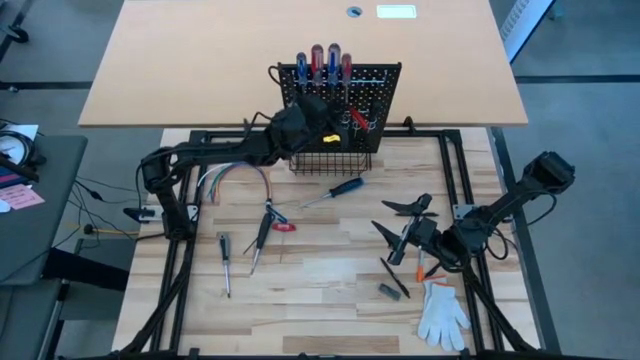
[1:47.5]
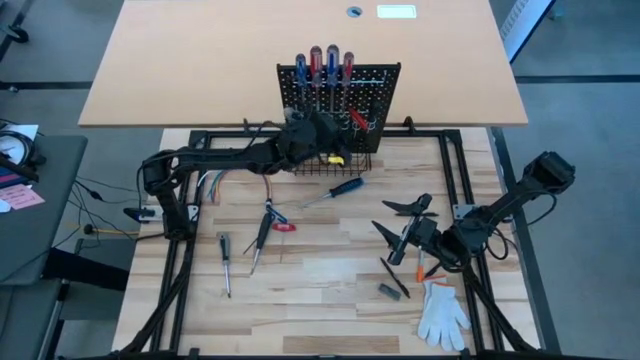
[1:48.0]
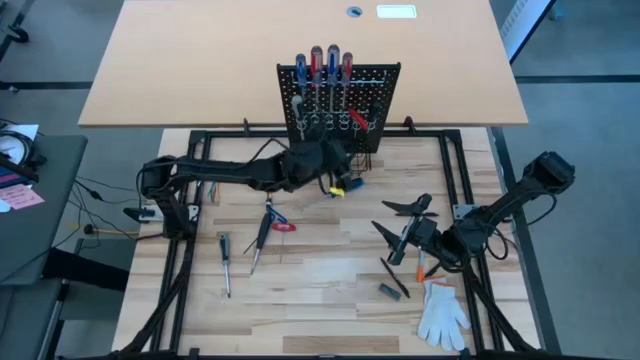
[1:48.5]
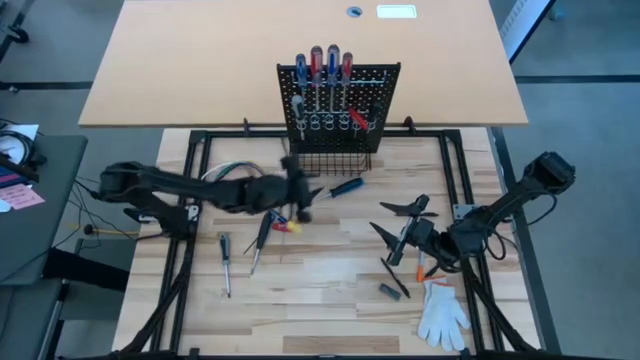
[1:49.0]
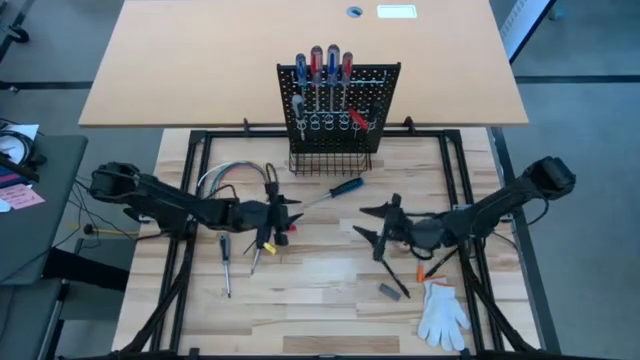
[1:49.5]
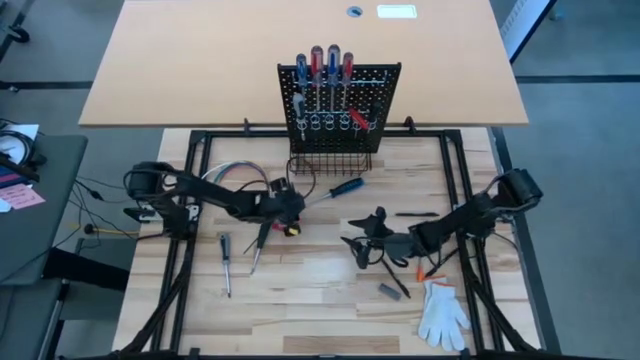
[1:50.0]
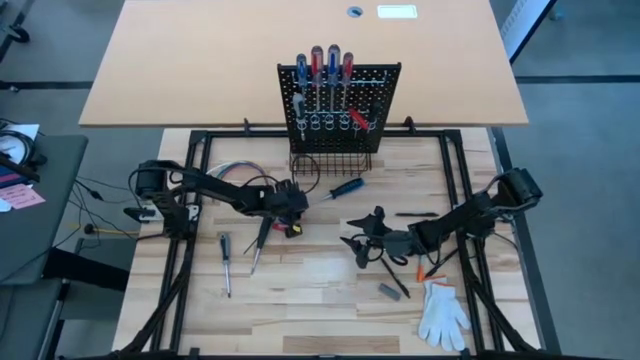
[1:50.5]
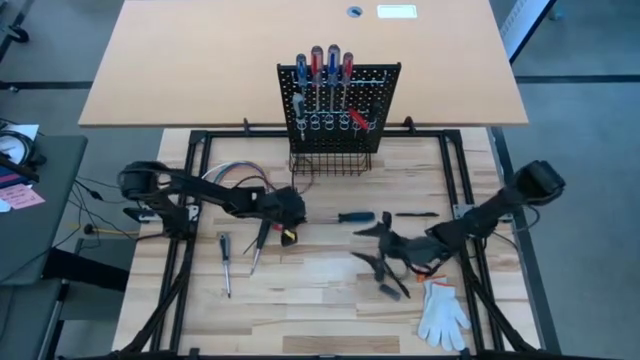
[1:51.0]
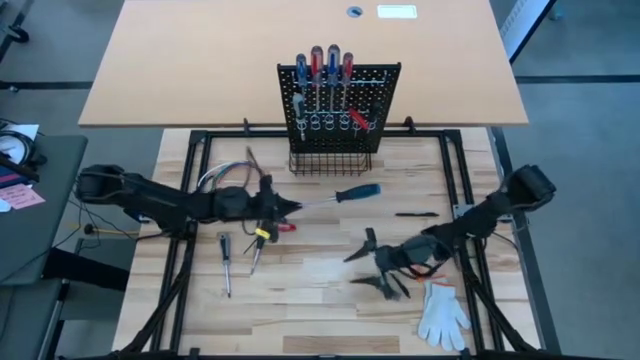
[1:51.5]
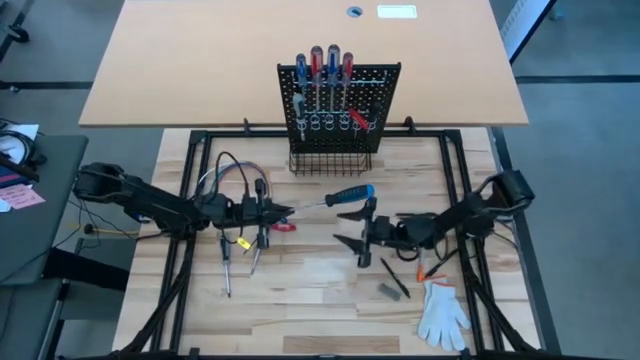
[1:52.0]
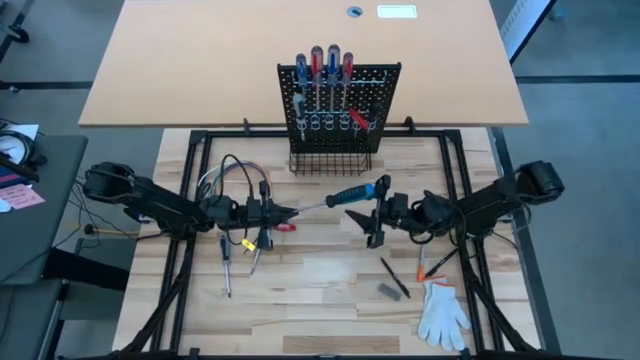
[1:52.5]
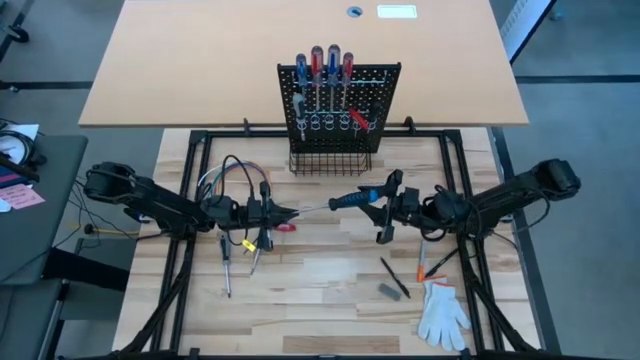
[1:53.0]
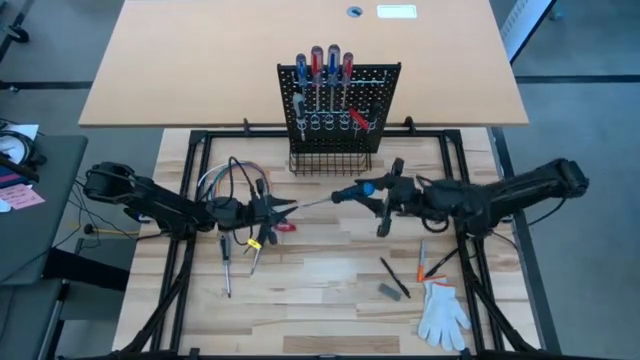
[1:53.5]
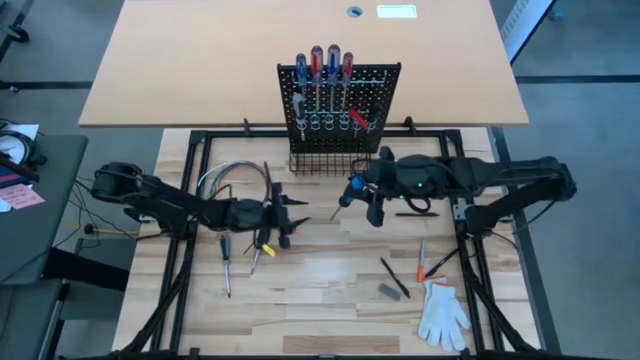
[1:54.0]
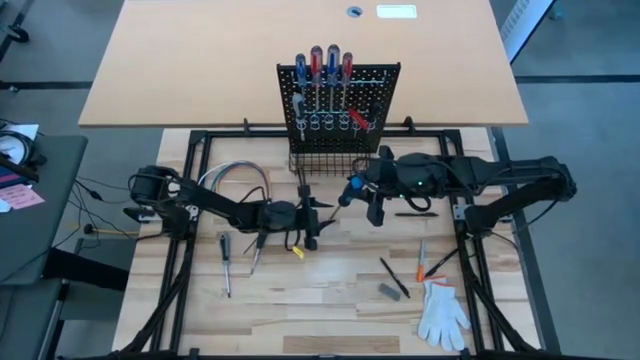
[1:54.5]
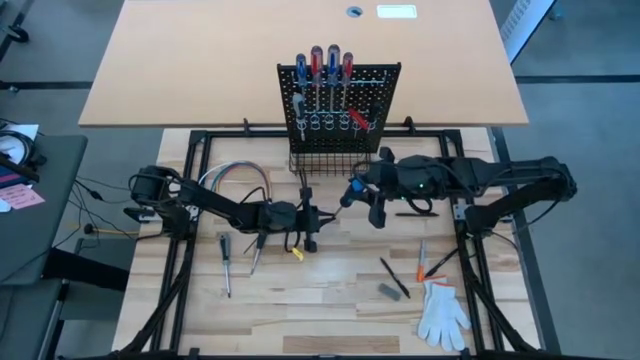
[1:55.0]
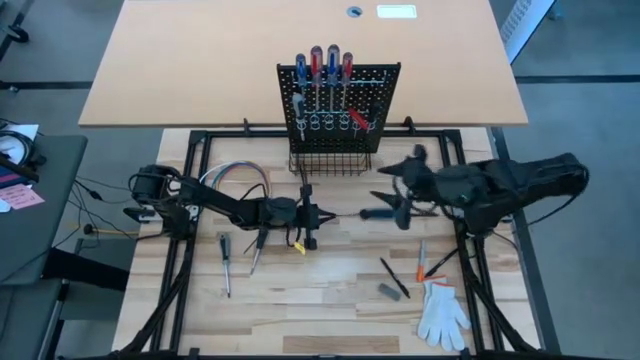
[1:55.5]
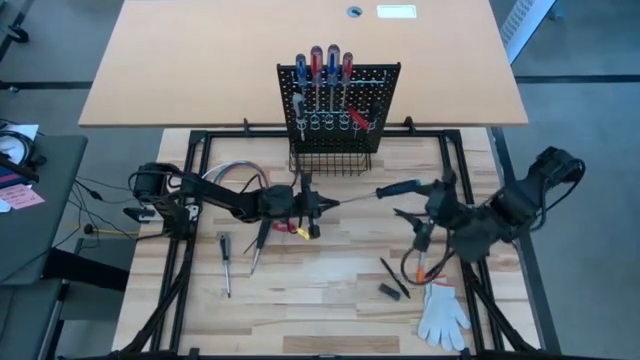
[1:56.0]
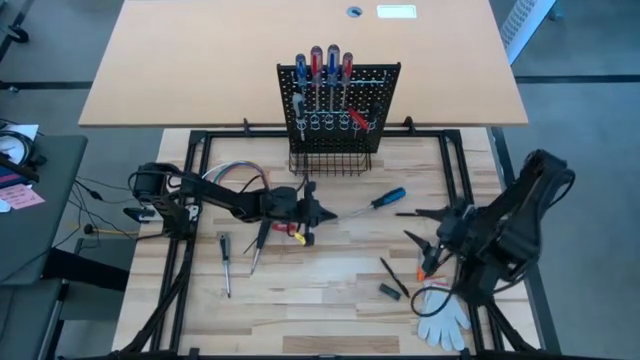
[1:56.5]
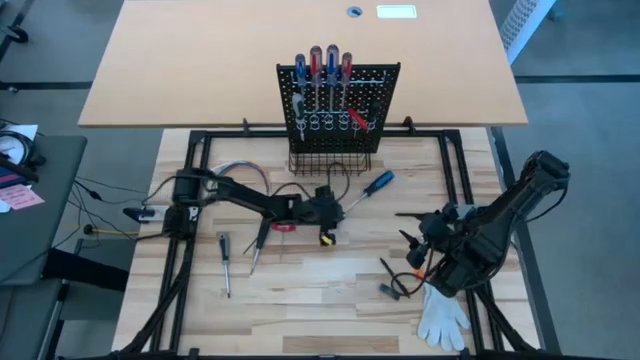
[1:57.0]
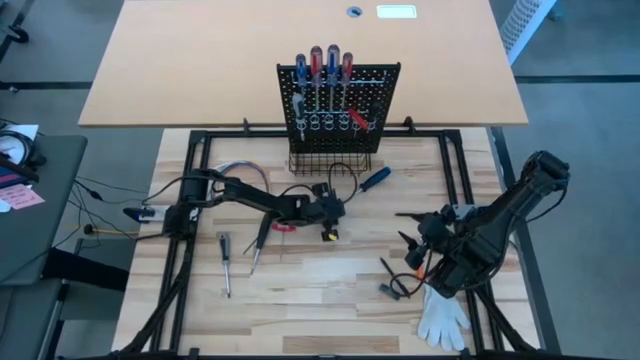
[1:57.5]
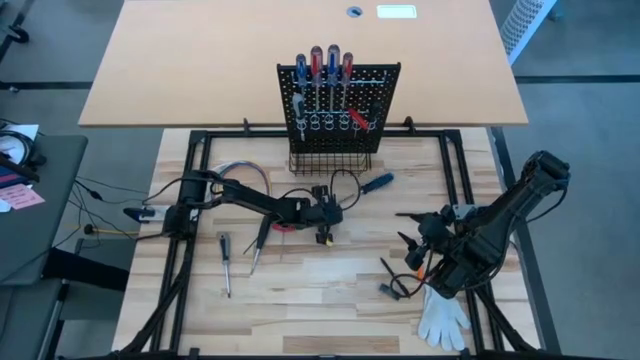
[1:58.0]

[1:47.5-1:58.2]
Task: Hang tools onto peg board
Hang the black and blue screwdriver on the black peg board

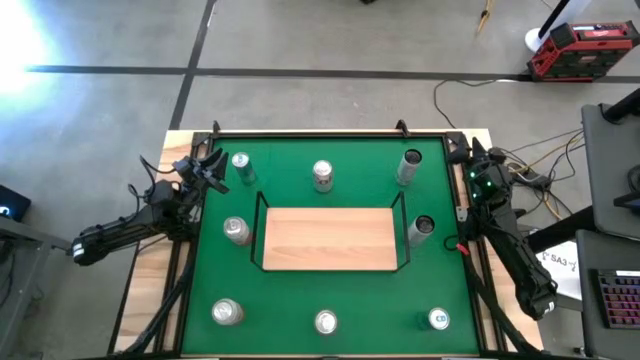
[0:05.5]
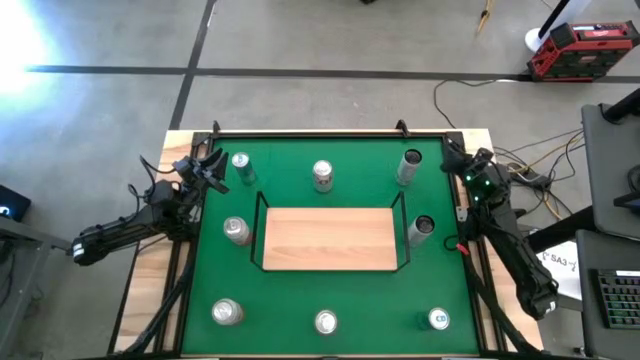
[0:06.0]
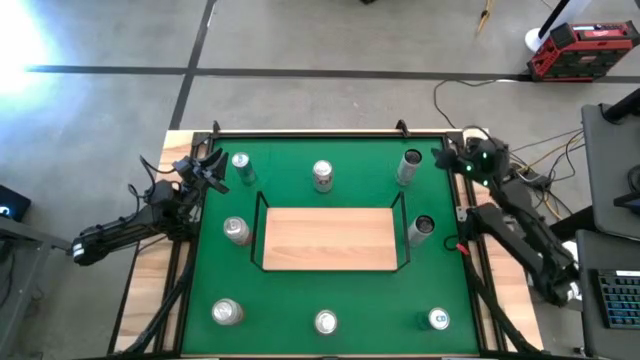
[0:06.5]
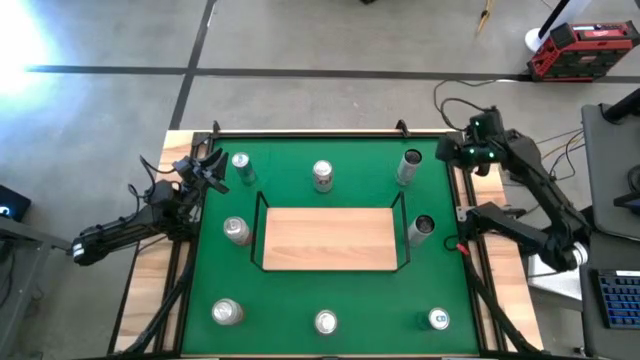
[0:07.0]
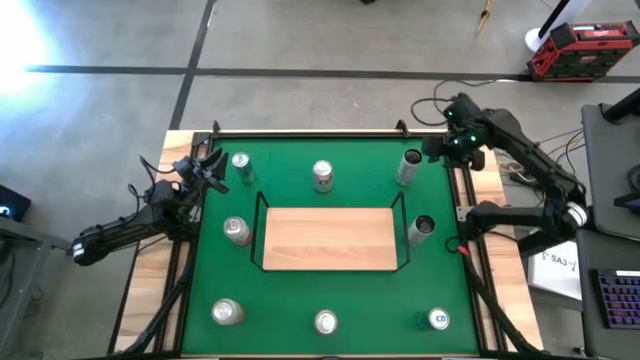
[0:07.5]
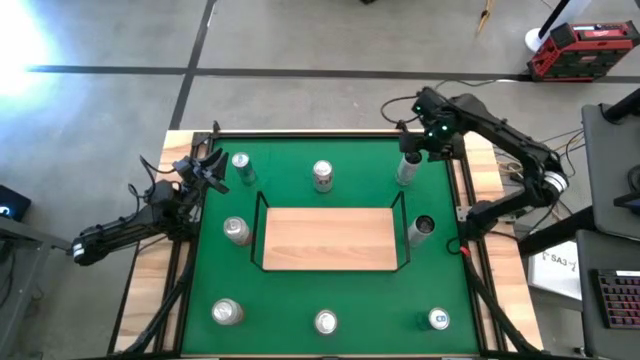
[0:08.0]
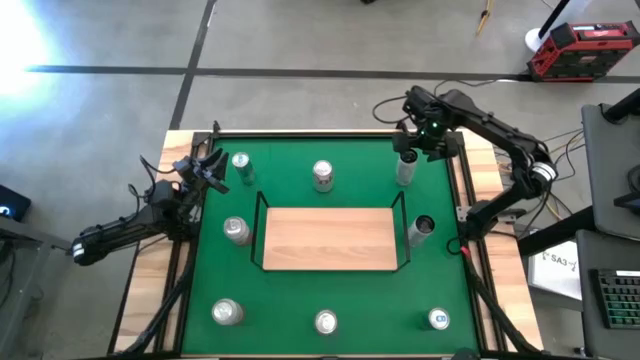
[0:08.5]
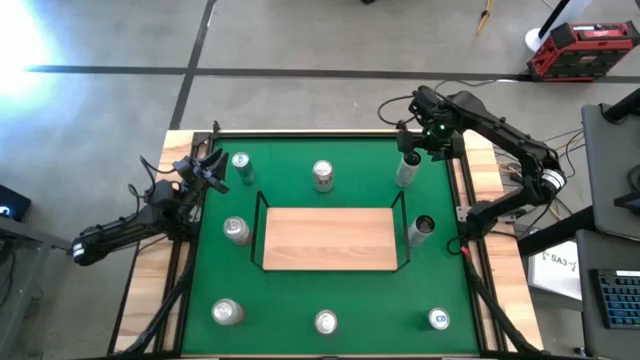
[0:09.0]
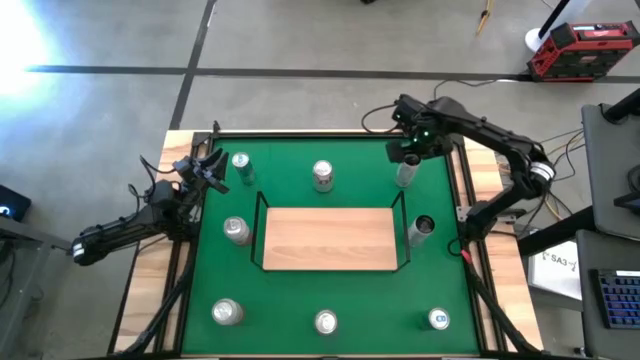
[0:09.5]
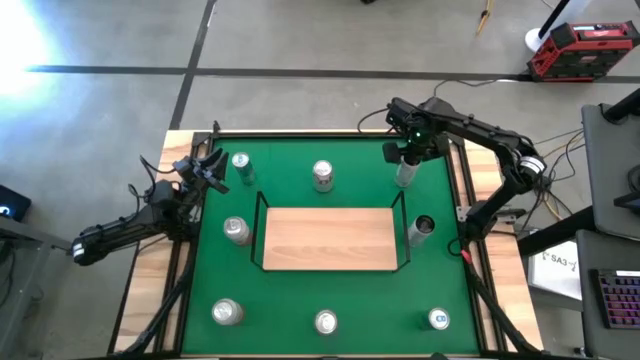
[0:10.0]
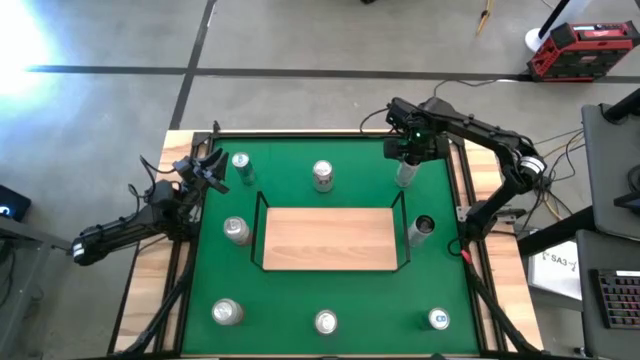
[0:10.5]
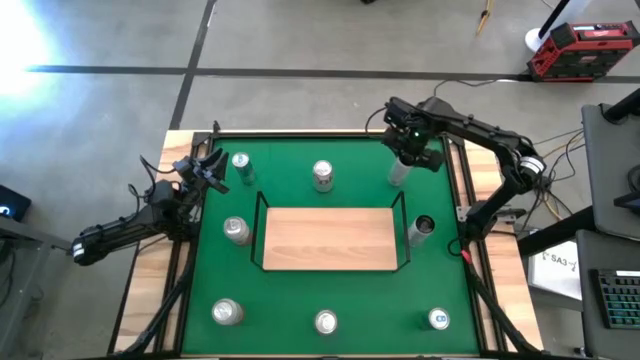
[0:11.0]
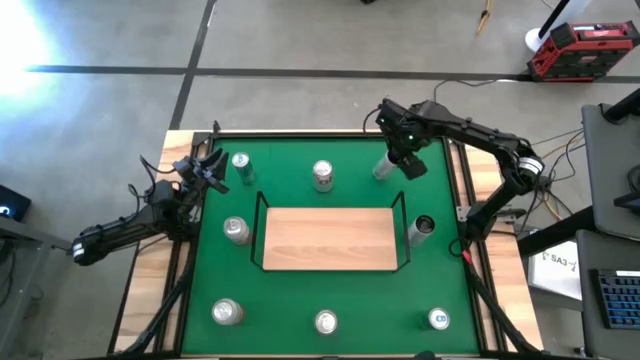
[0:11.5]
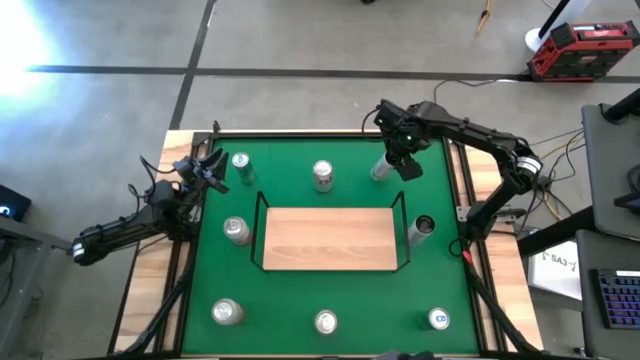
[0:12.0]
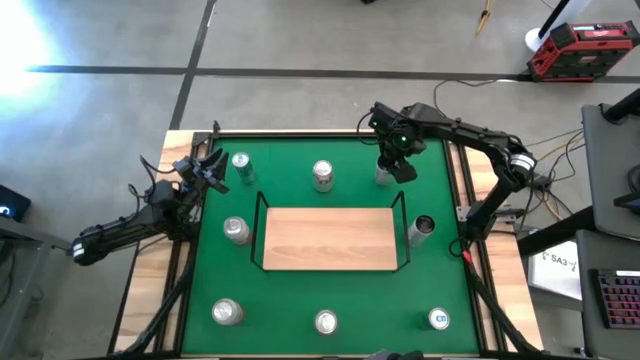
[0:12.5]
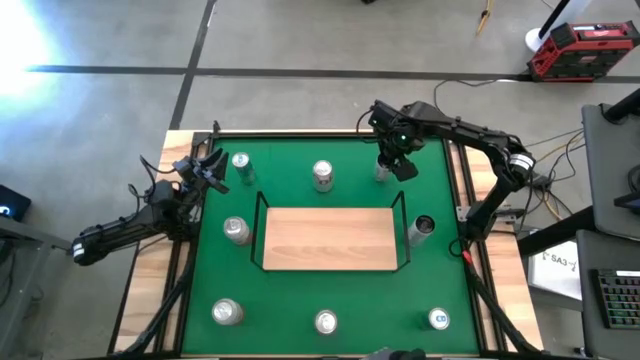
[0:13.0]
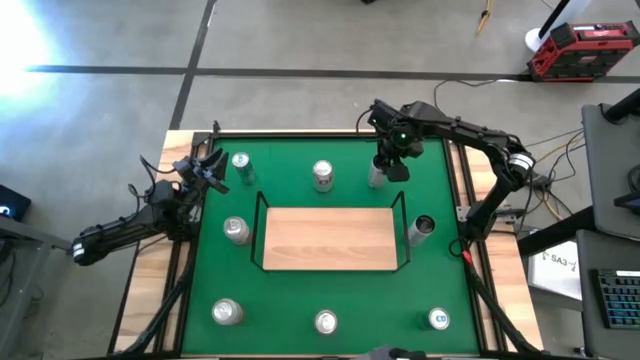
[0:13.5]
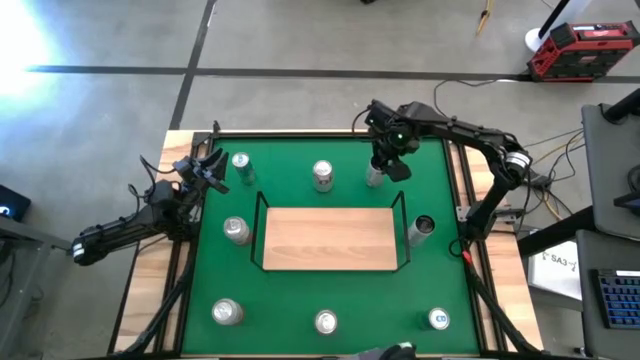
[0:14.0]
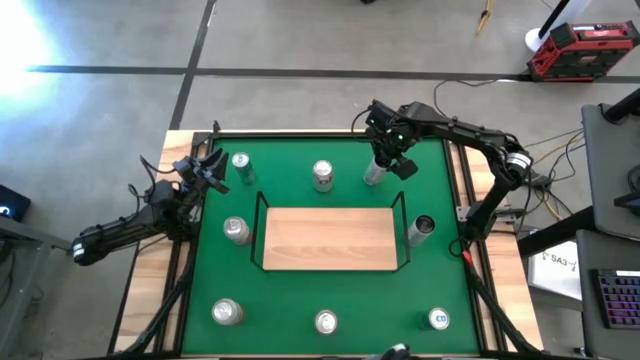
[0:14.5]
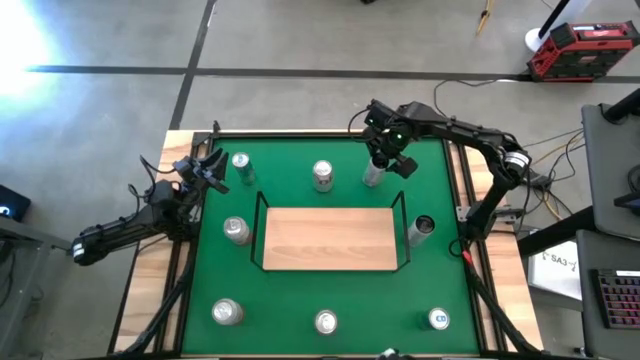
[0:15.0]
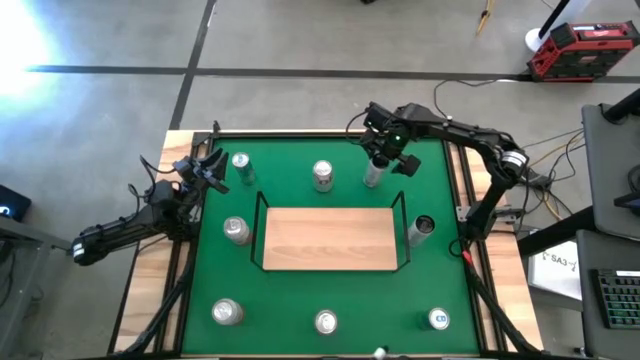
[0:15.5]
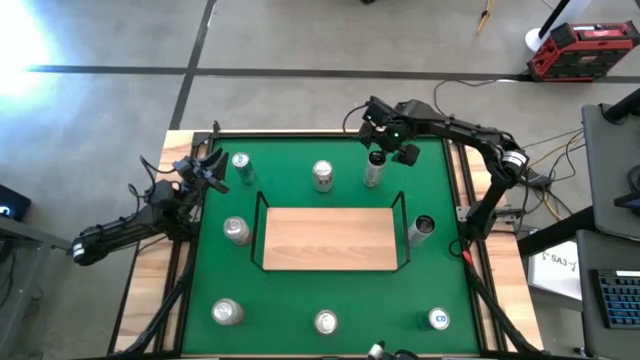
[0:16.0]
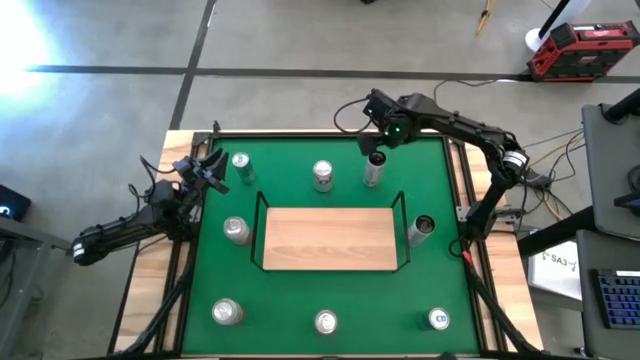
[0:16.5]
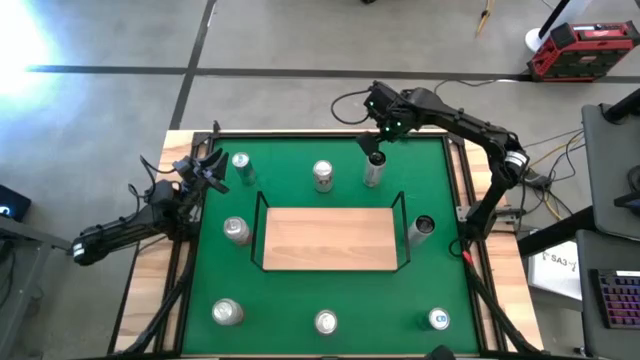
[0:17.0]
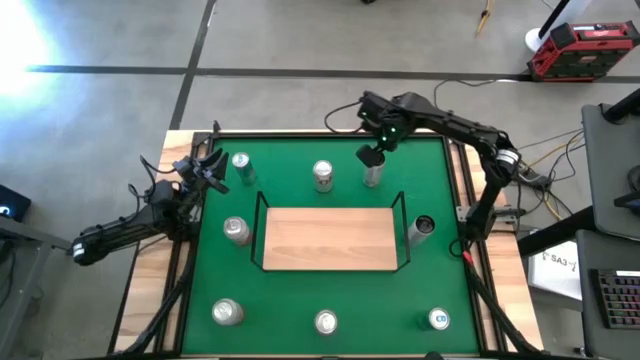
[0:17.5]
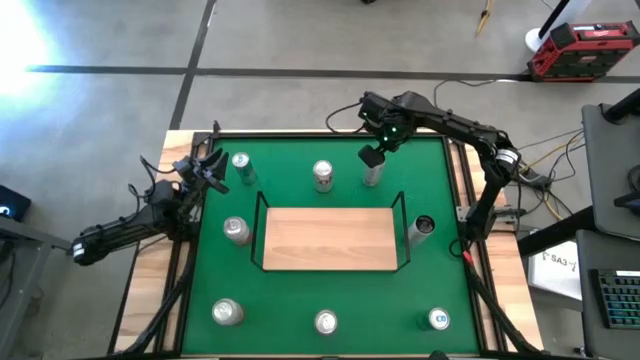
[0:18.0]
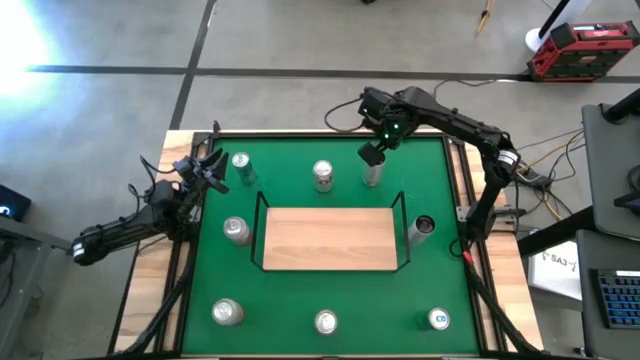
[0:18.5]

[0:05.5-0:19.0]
Task: Place canned beverage on shelf
Put the top white-yellow soda can on the shelf
